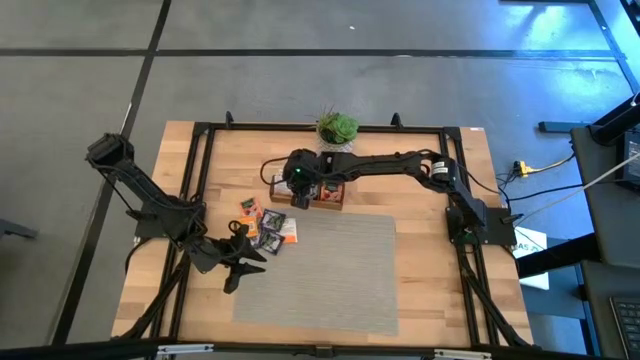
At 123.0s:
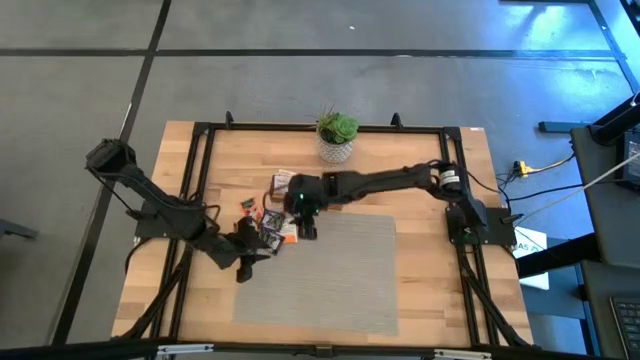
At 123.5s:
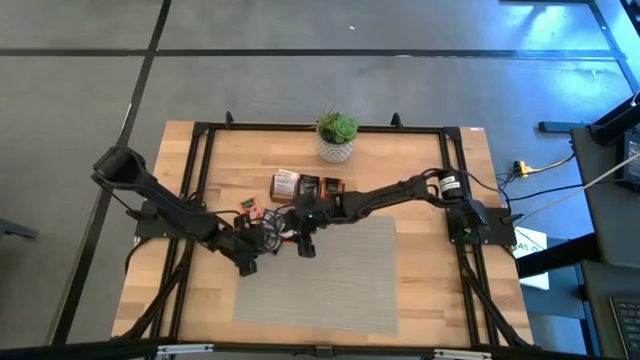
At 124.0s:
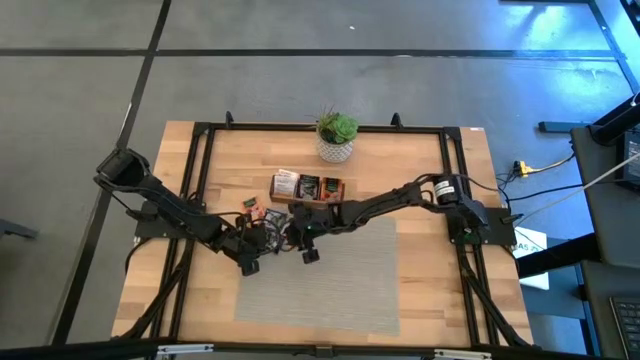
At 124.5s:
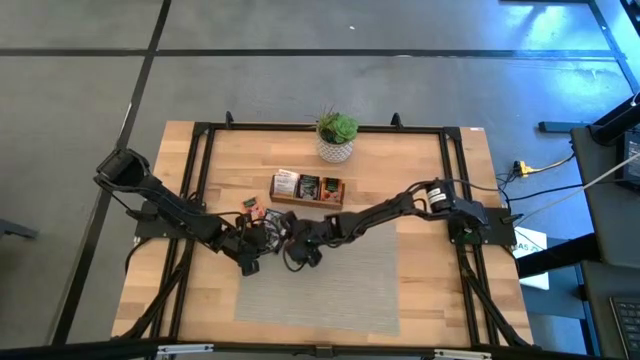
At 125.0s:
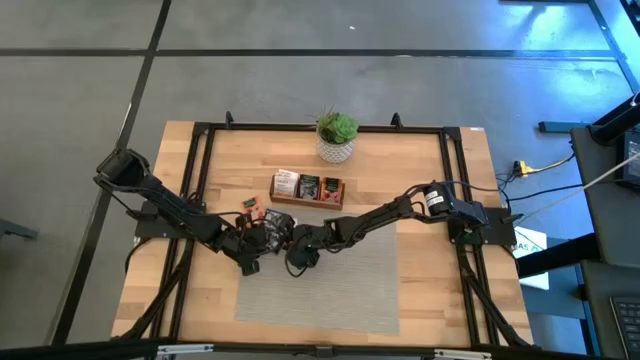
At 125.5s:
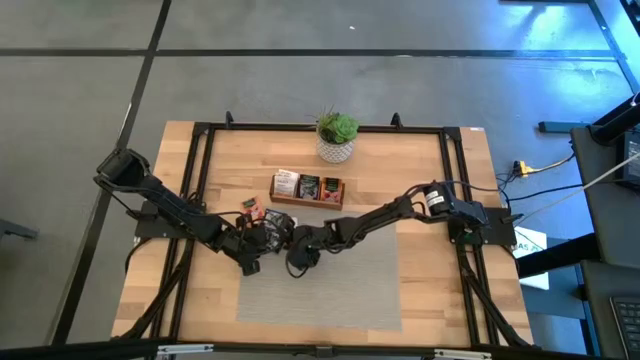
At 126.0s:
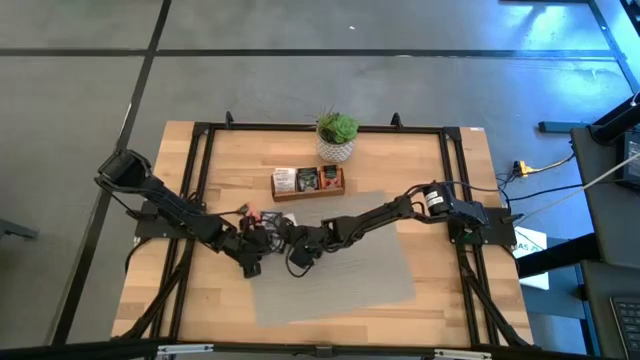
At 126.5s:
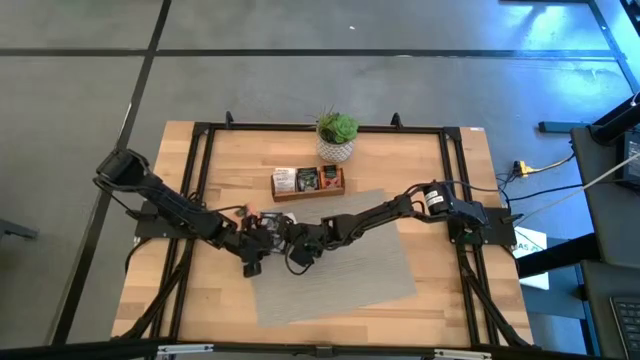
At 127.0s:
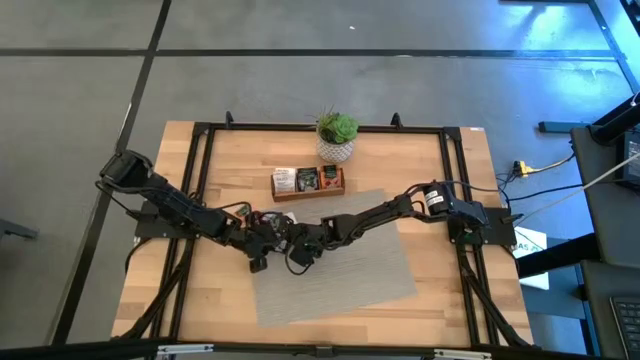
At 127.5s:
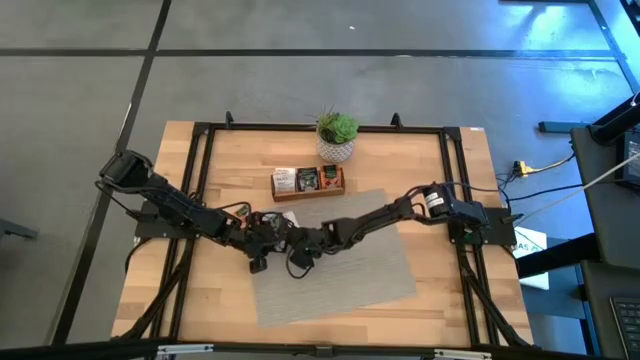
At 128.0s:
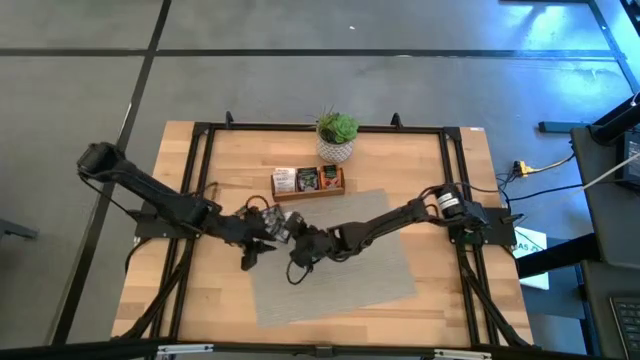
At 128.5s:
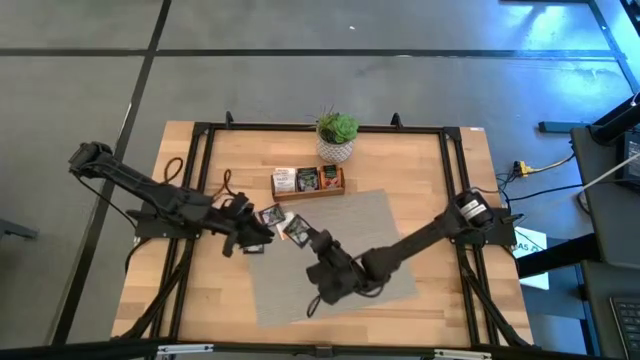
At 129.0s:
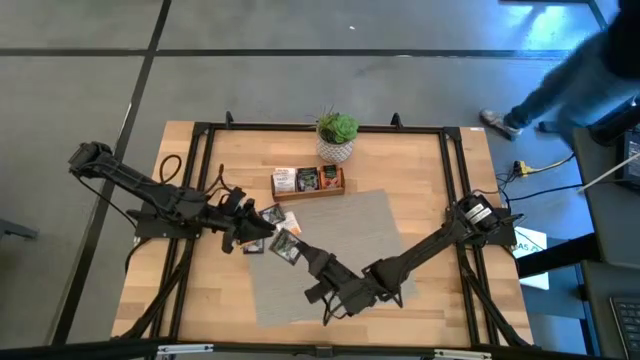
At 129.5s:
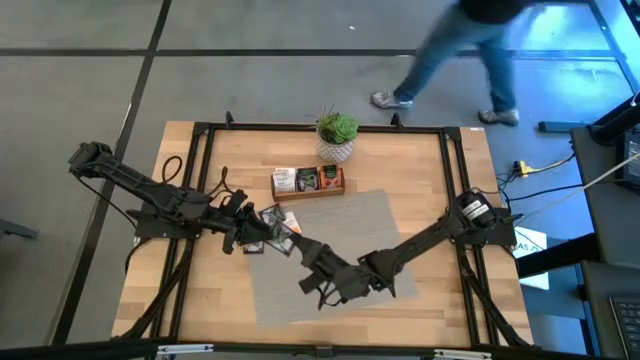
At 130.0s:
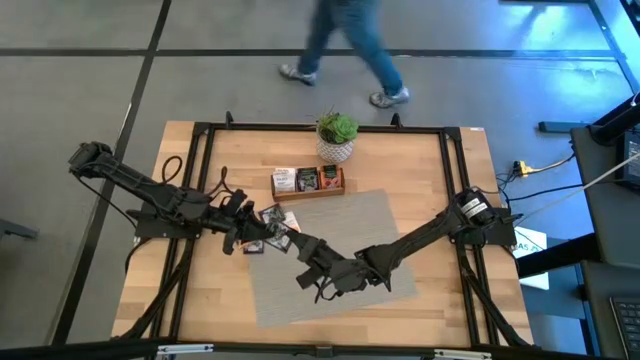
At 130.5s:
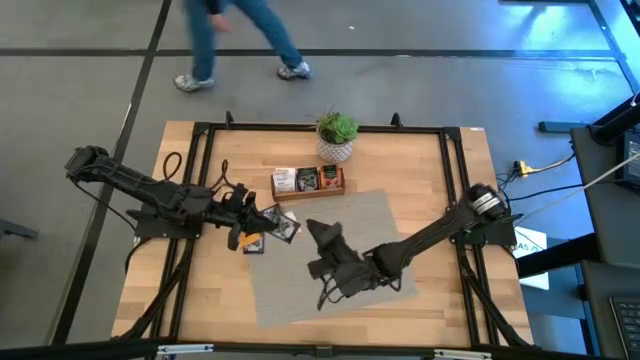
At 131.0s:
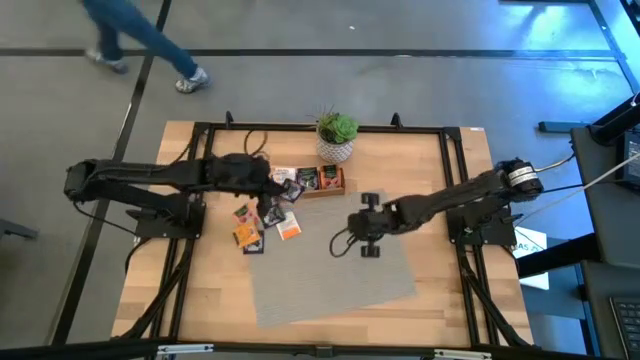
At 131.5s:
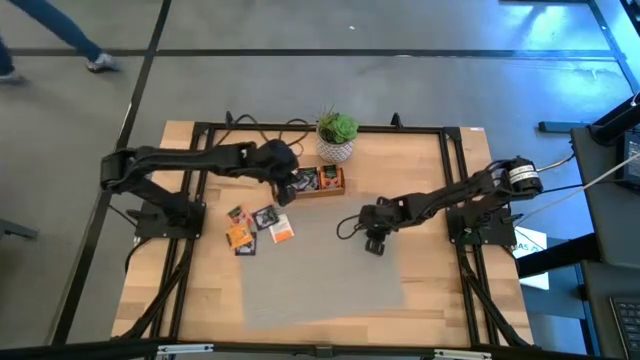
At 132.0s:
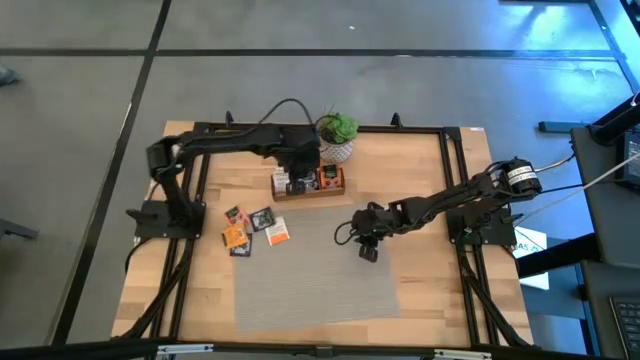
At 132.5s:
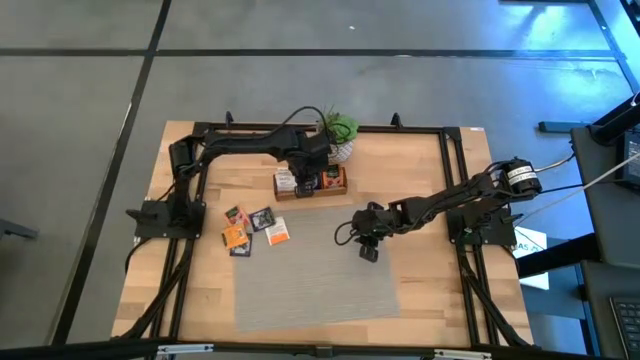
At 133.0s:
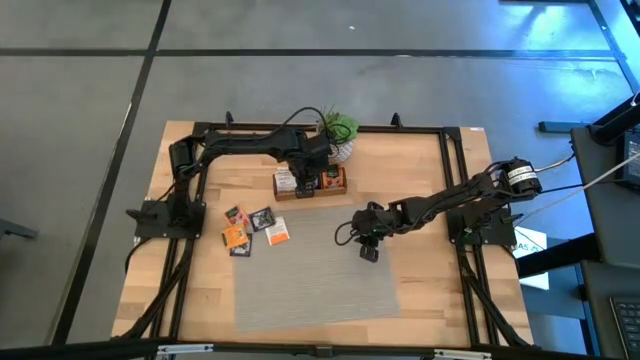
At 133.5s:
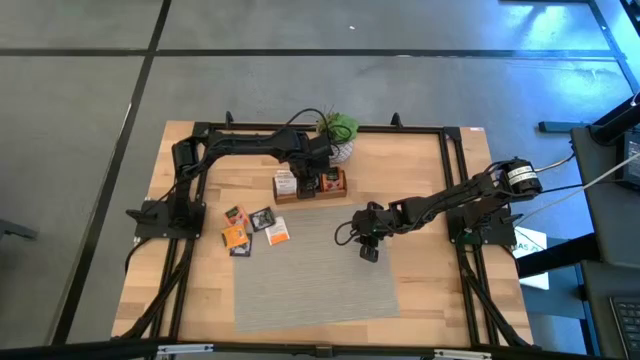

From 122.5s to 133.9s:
Task: Pick & Place Tea
Put the dark blue tea bag into the middle section of the wooden organizer

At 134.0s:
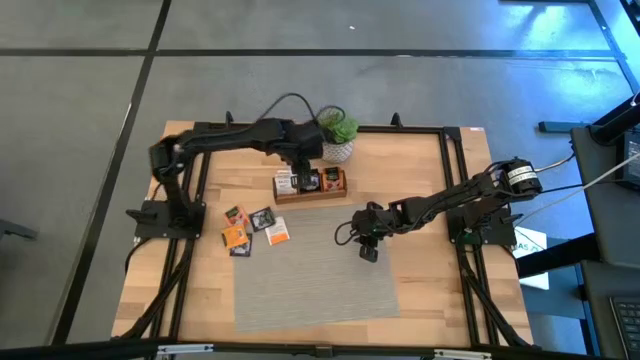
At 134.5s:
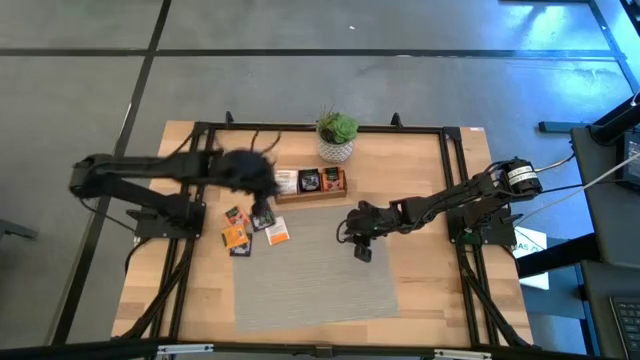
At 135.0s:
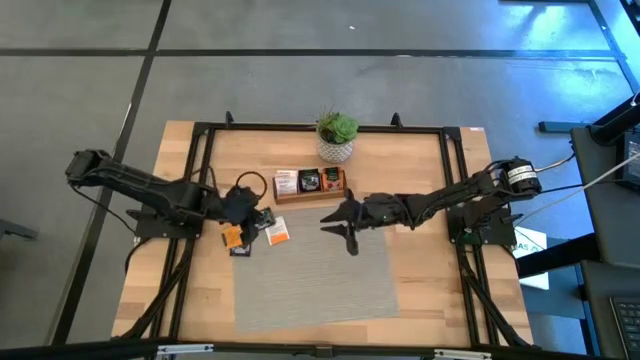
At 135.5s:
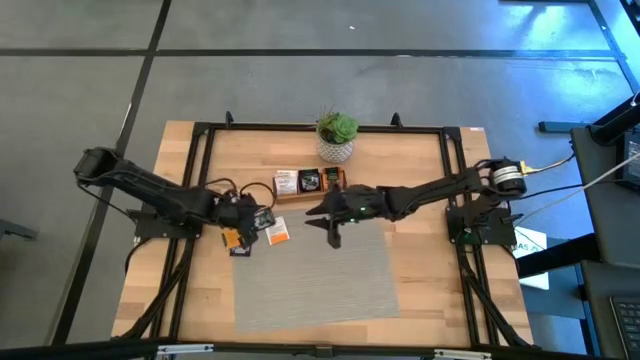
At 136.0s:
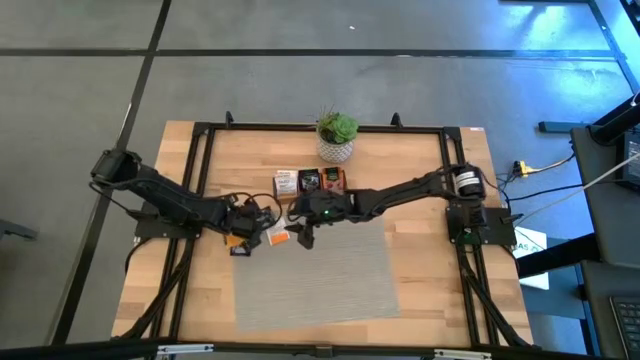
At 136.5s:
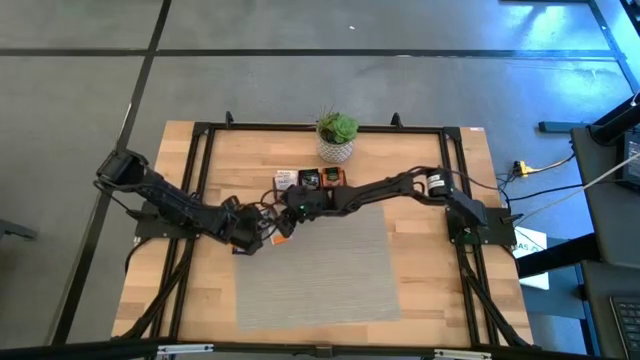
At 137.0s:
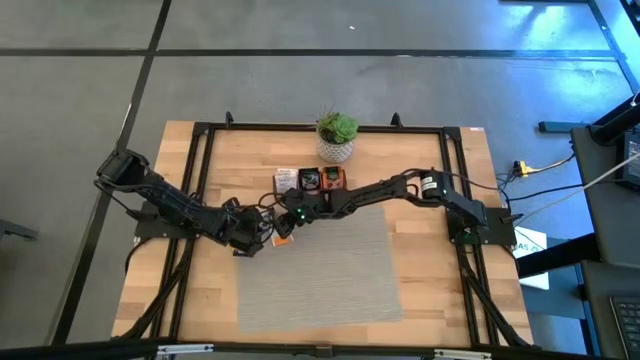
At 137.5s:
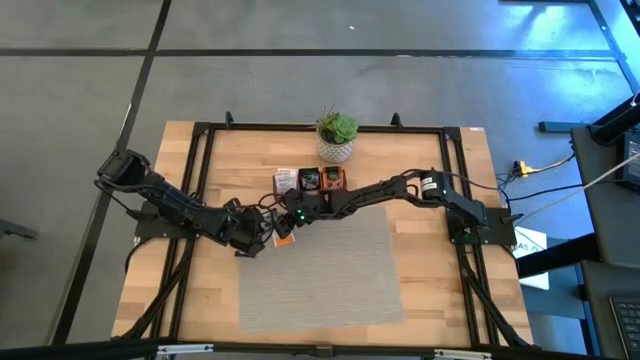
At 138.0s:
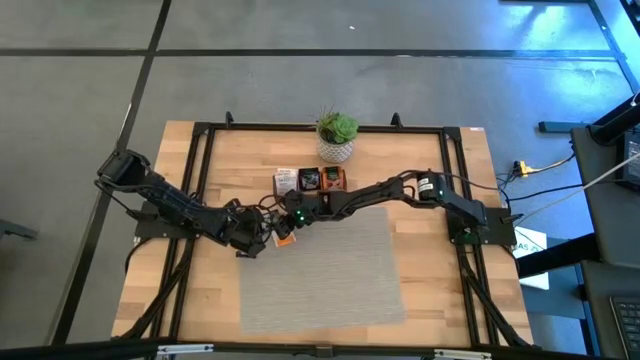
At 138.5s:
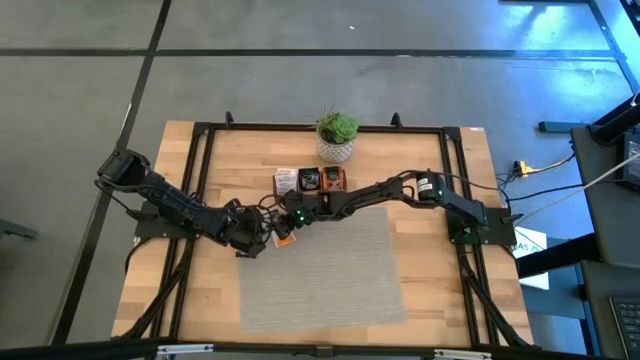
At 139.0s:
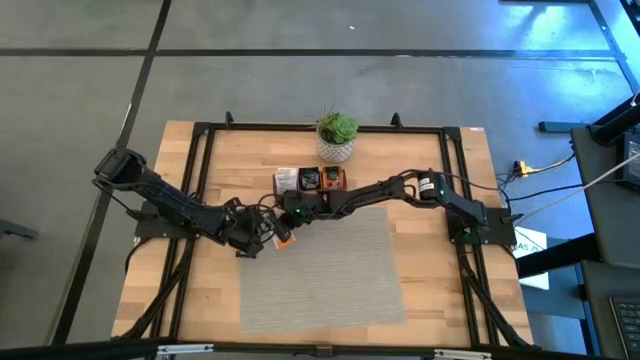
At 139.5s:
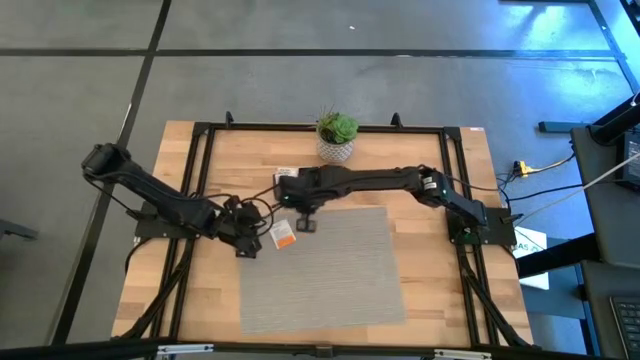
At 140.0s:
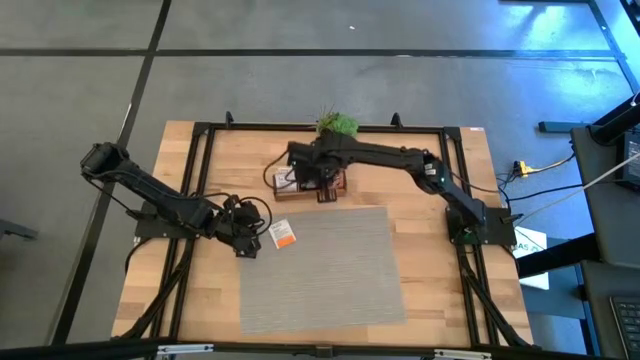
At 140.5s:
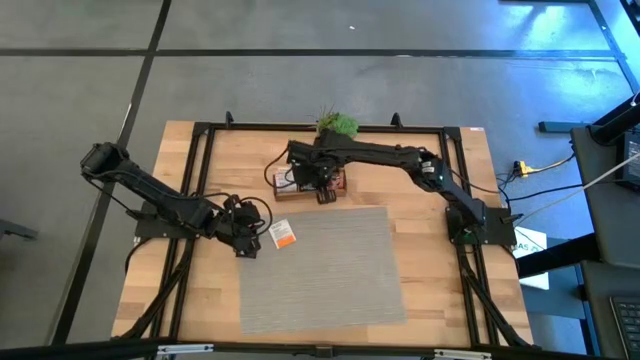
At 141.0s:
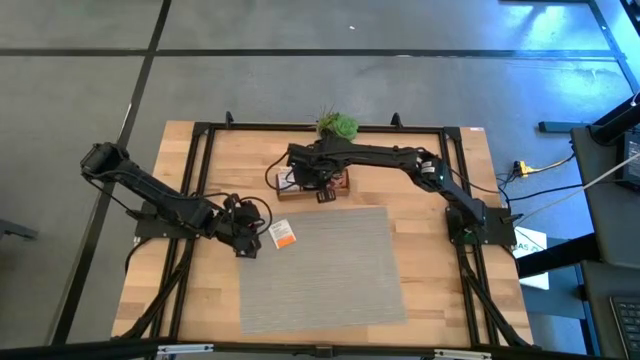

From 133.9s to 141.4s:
Put the dark blue tea bag into the middle section of the wooden organizer

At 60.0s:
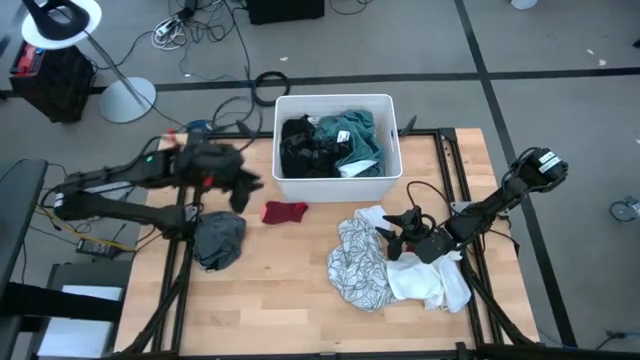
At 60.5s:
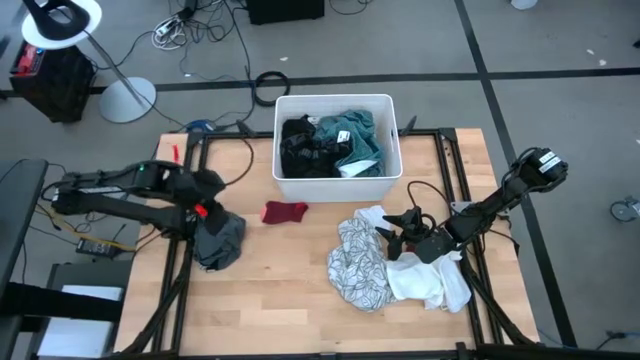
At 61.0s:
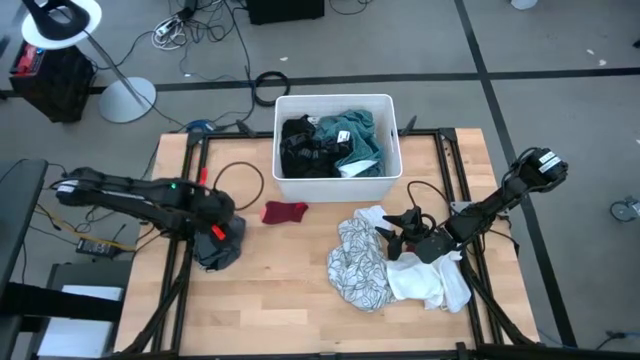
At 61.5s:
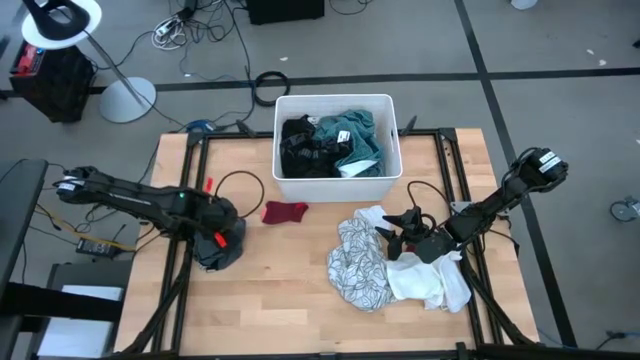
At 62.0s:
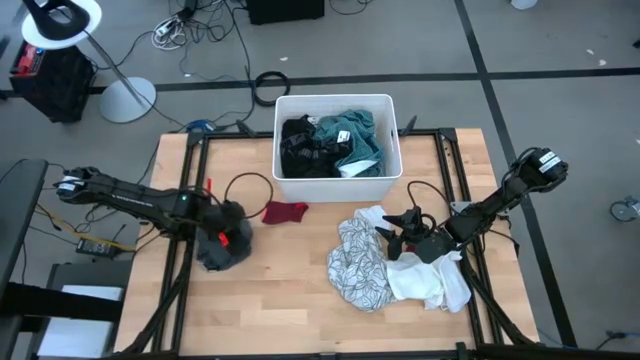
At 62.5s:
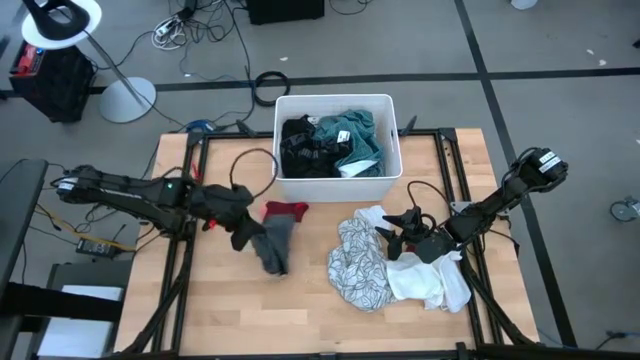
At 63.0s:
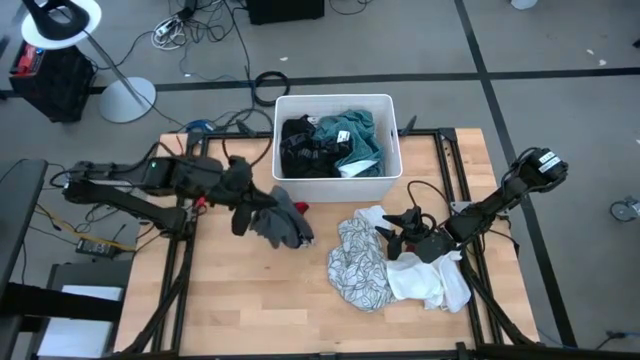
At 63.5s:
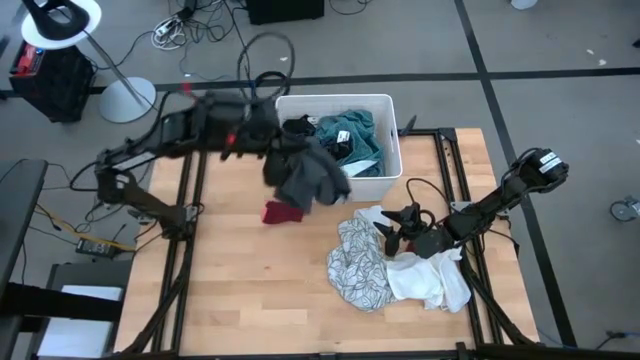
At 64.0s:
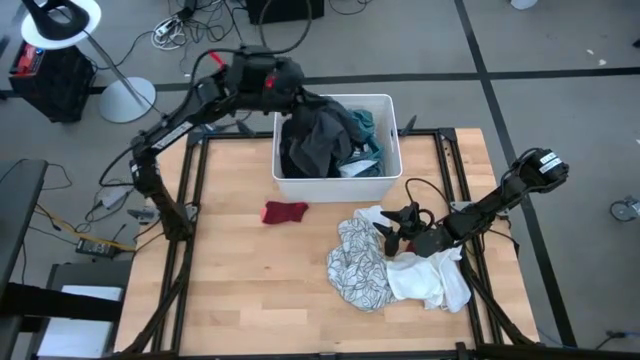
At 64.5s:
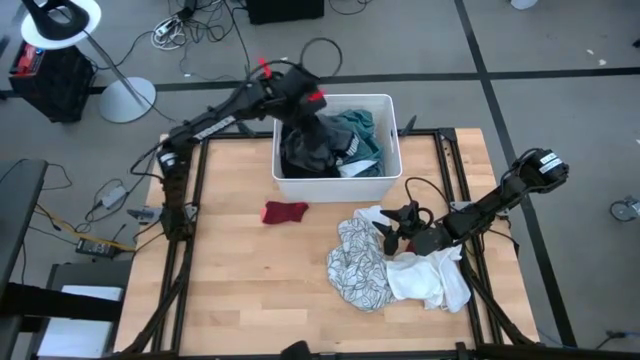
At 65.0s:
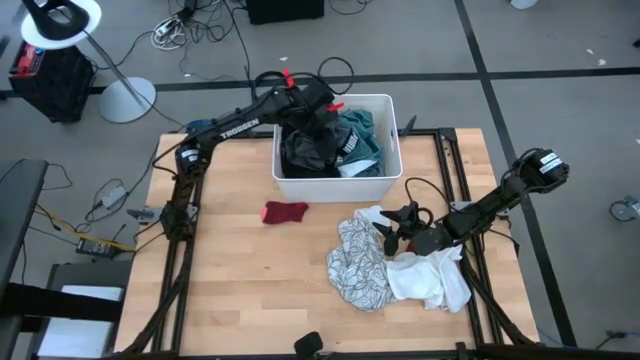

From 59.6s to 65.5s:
Task: Sort clothes
Put the blue gray boxer into the white laundry bin
